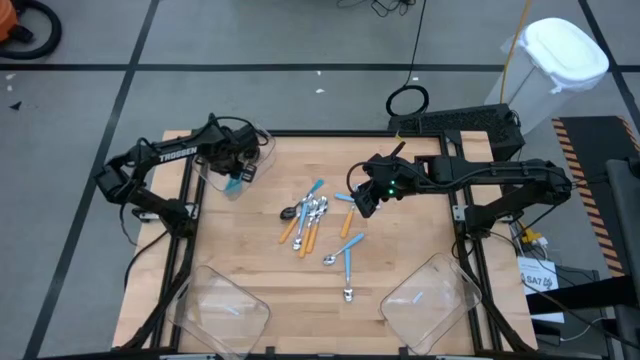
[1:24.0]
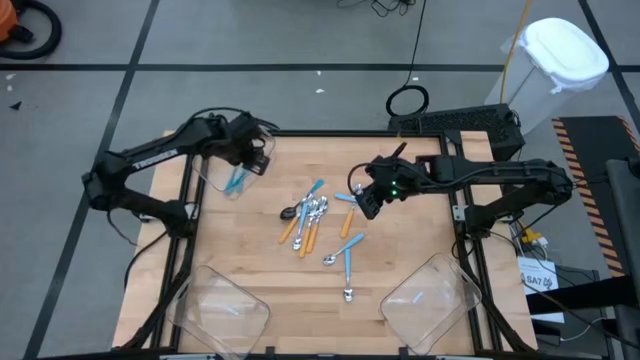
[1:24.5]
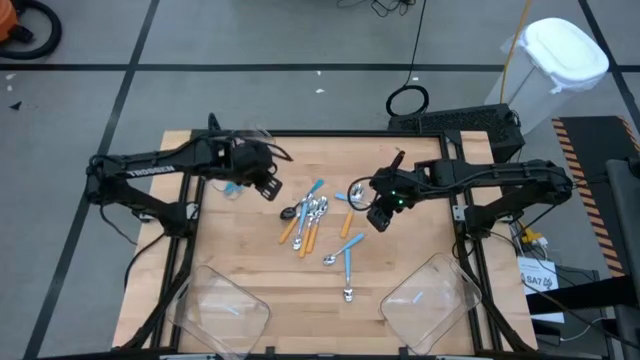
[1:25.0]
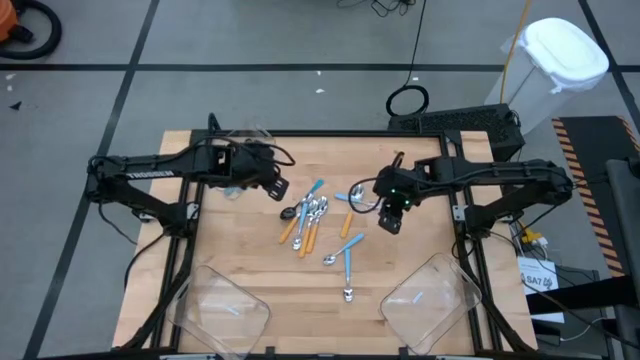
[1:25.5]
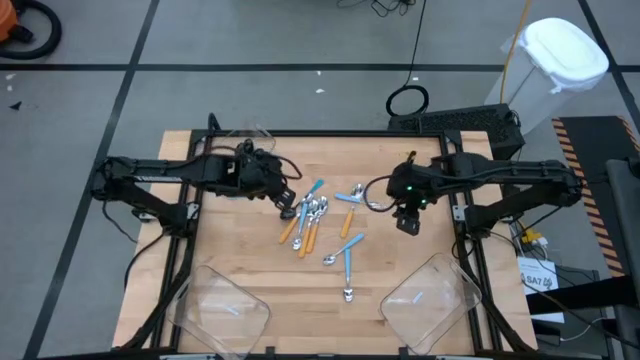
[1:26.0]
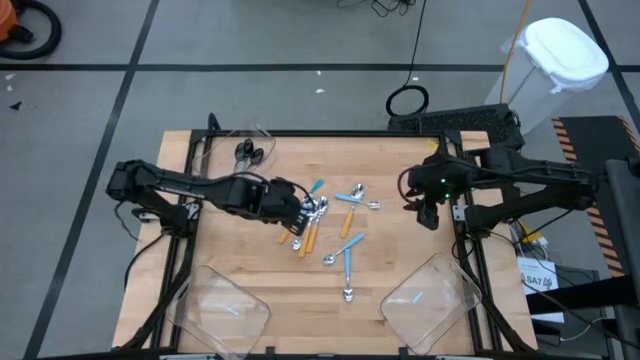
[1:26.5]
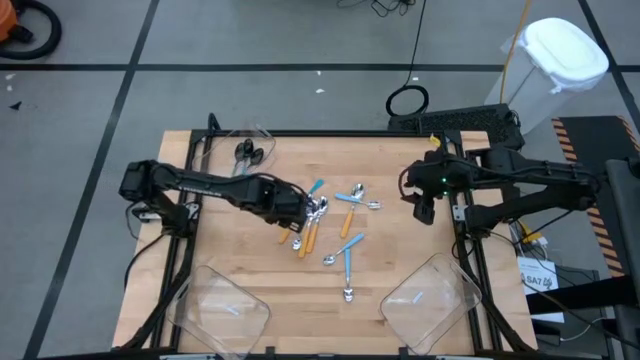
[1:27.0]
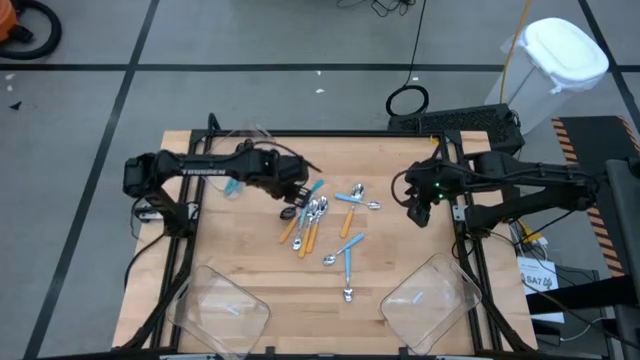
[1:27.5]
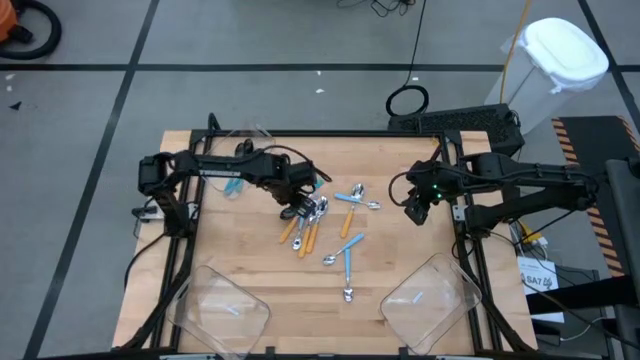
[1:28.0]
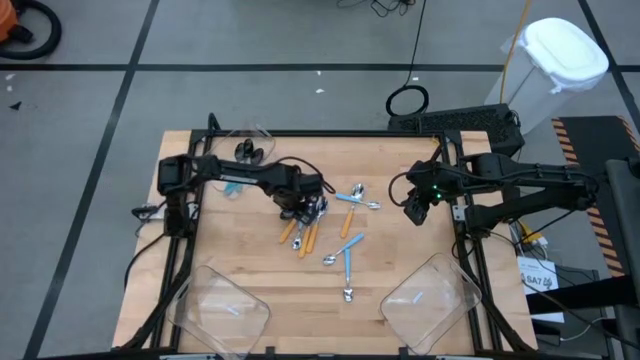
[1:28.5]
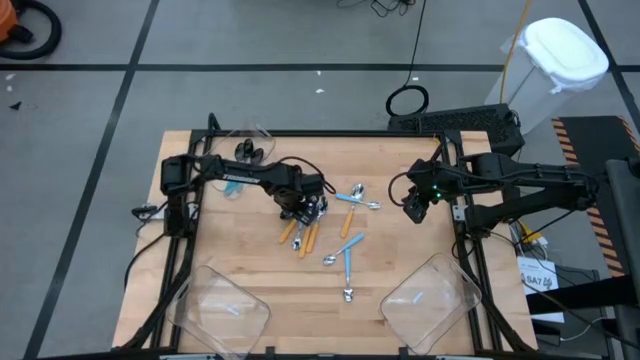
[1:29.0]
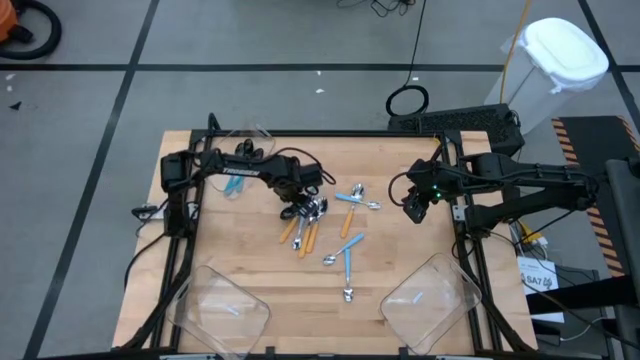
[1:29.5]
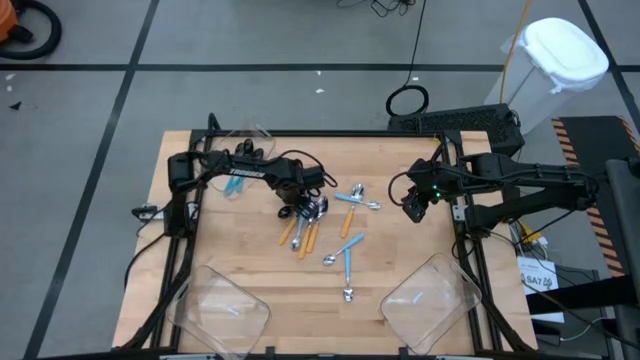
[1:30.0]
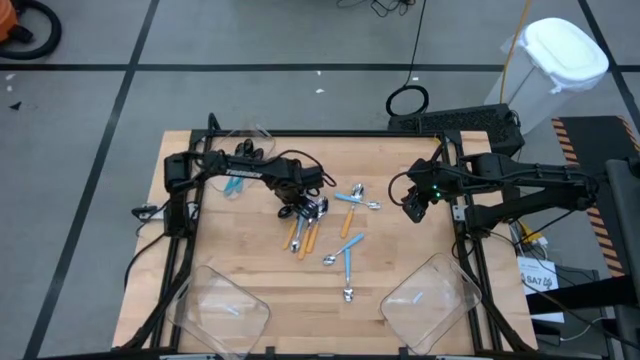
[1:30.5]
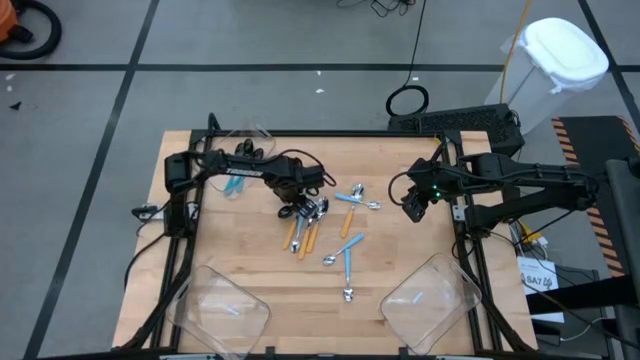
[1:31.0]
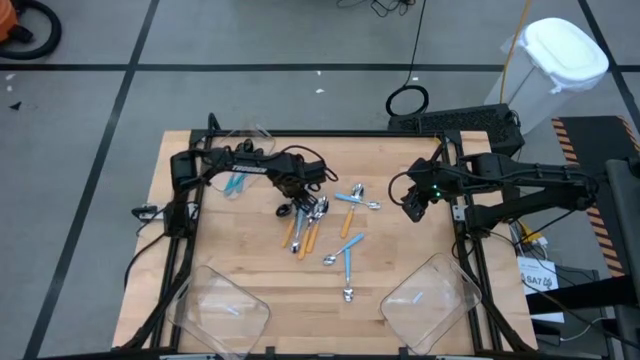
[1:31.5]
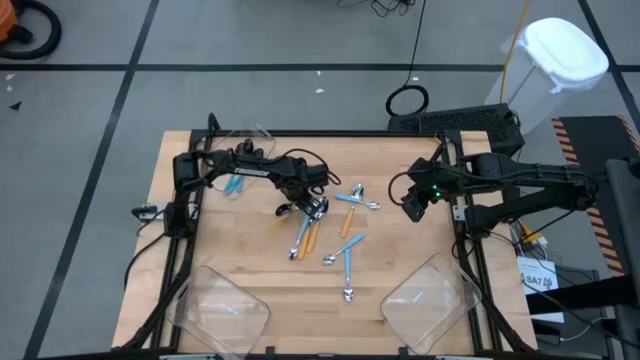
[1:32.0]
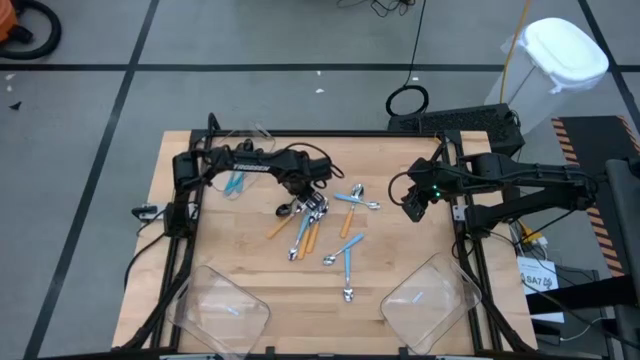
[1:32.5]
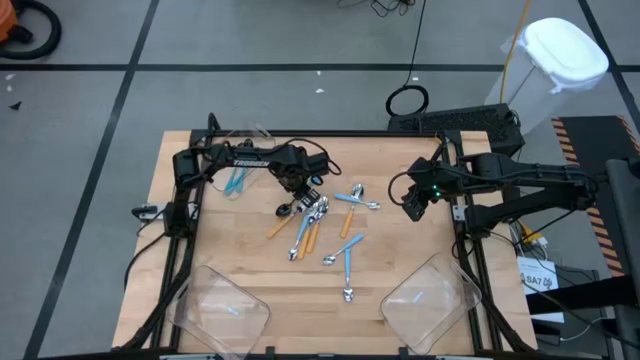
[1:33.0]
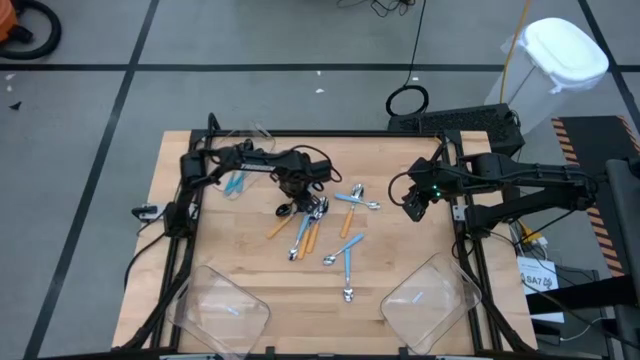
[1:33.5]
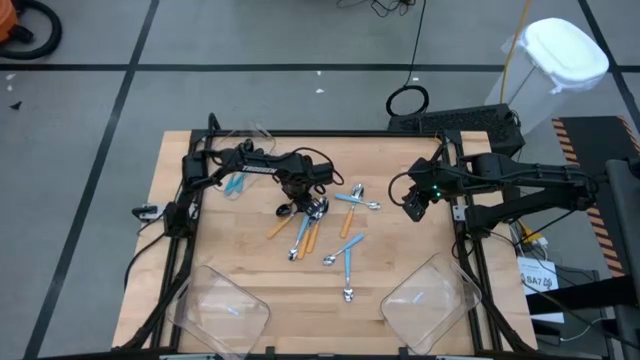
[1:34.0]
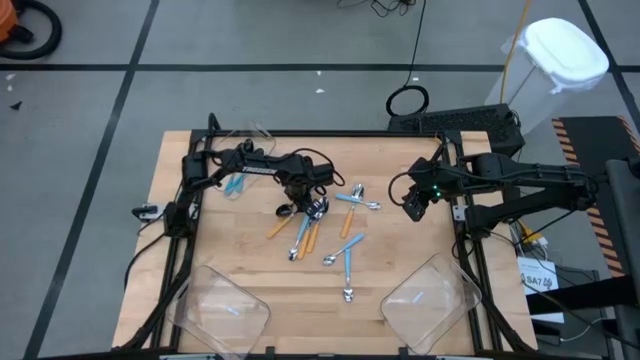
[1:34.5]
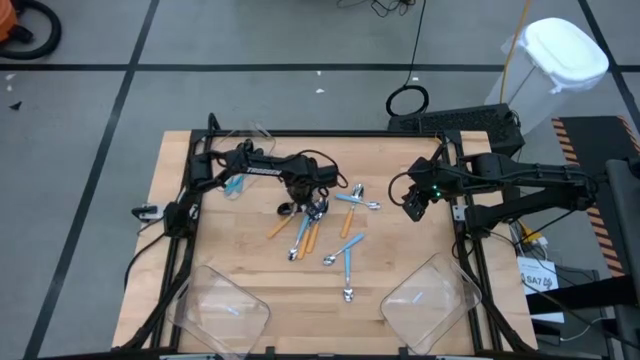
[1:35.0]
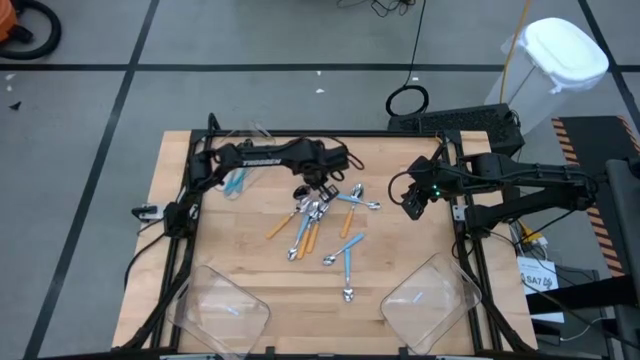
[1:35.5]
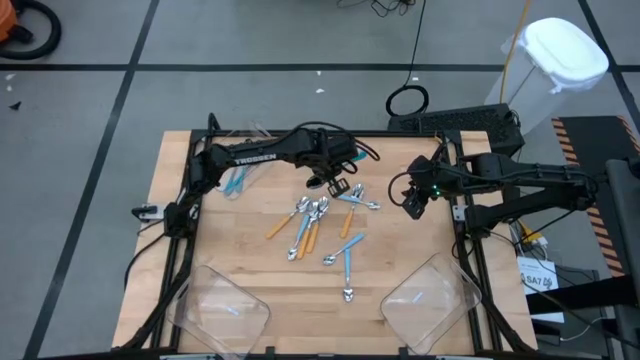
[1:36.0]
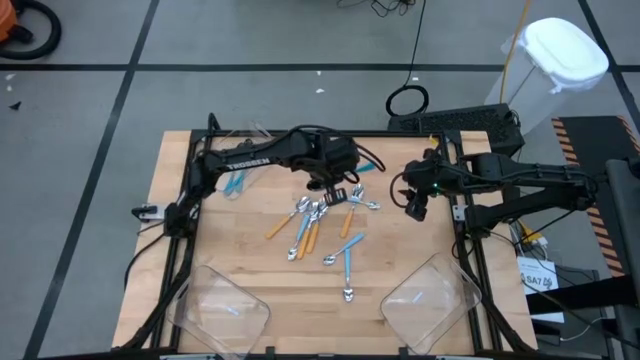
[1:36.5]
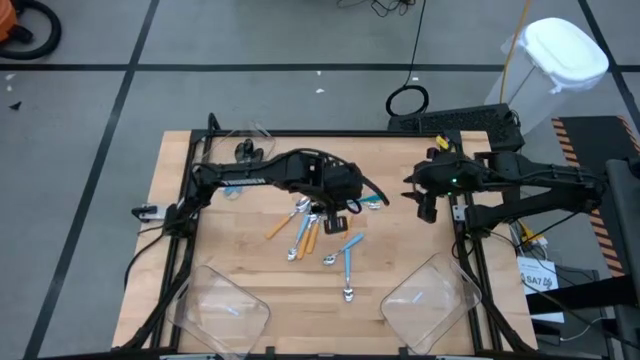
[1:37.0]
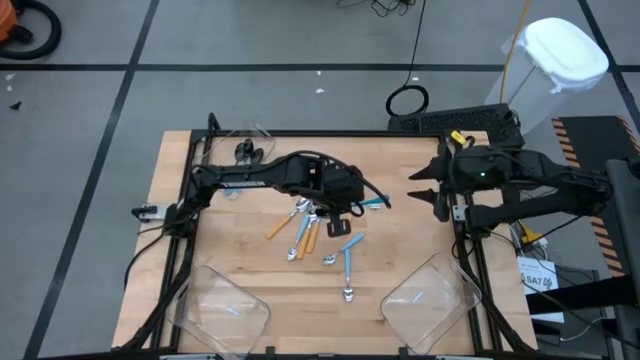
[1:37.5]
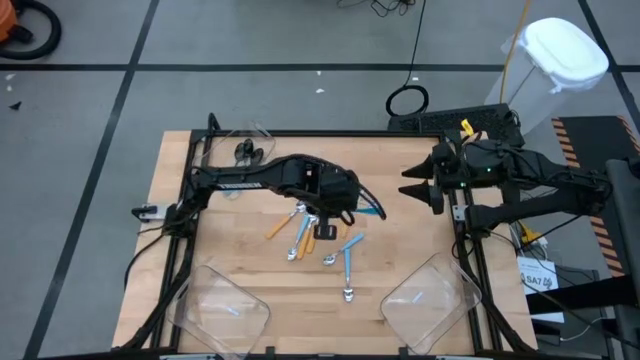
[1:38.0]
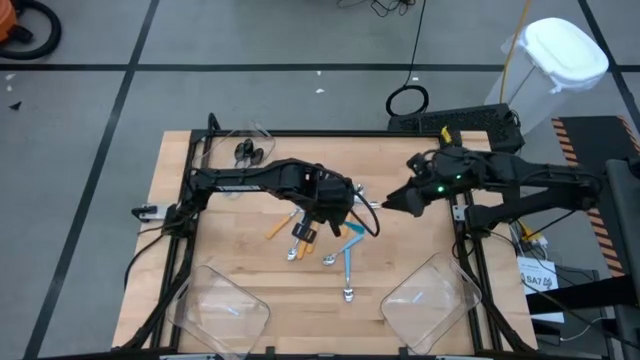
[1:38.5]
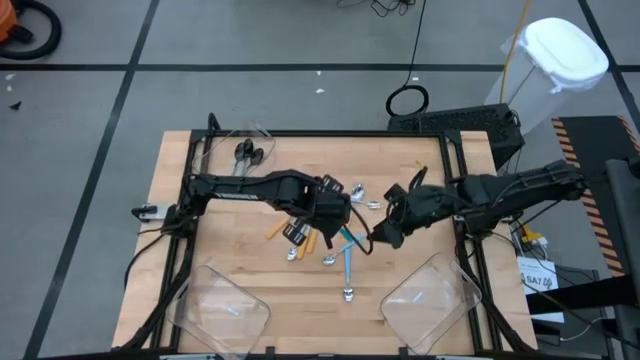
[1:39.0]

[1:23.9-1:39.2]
Task: Sort silverware by color (type)
Put the blue spoon into the top left transparent bin
